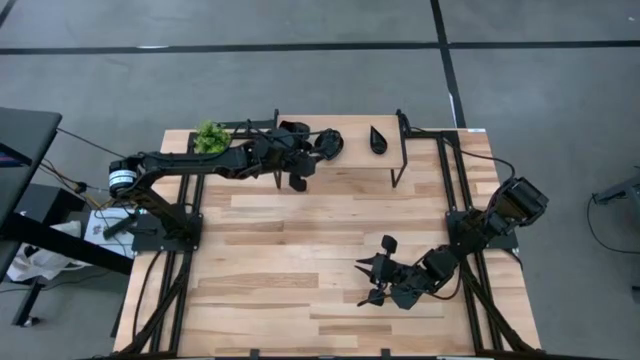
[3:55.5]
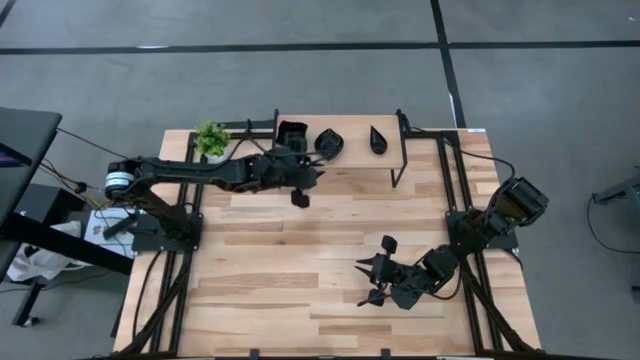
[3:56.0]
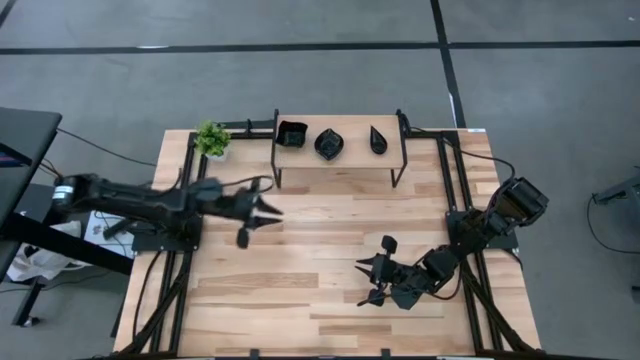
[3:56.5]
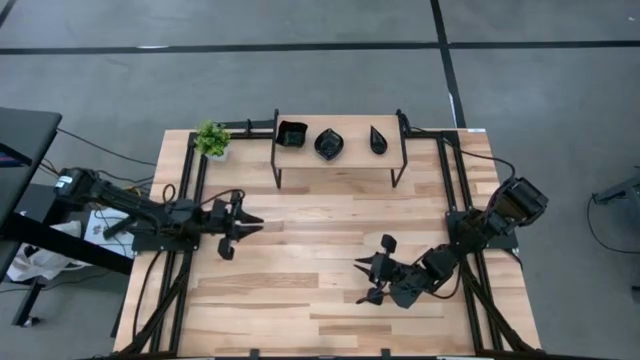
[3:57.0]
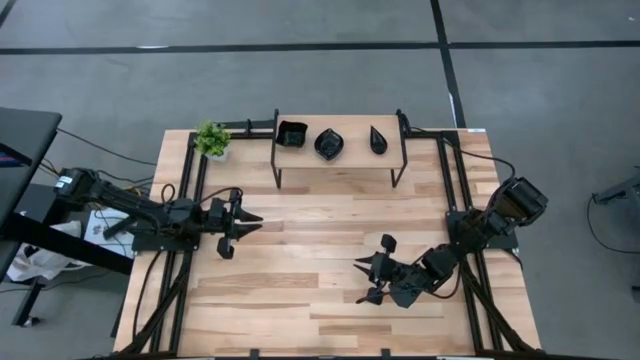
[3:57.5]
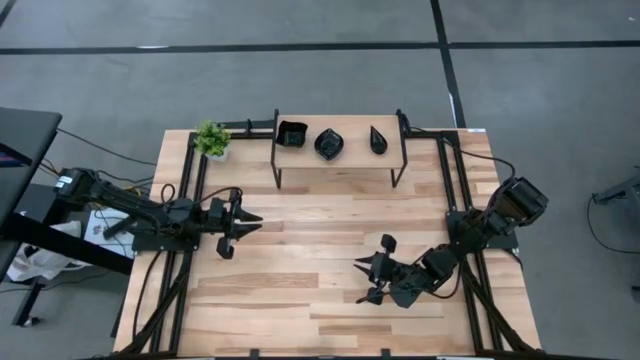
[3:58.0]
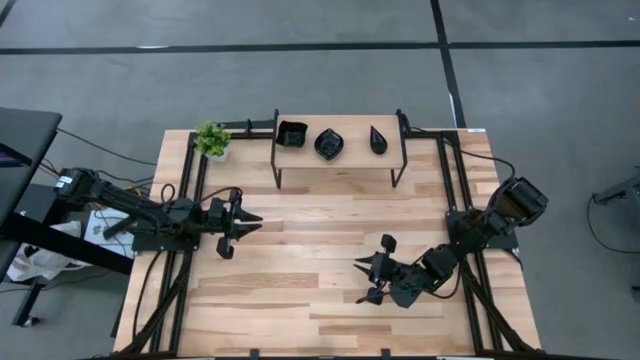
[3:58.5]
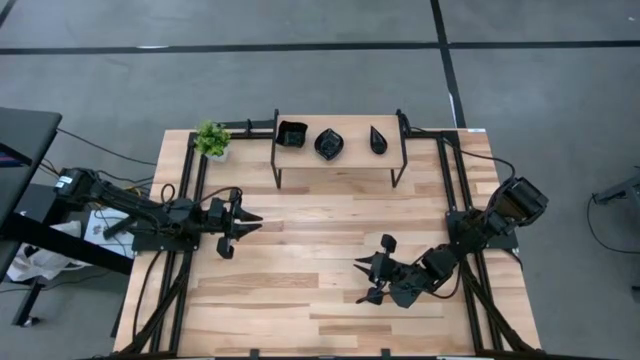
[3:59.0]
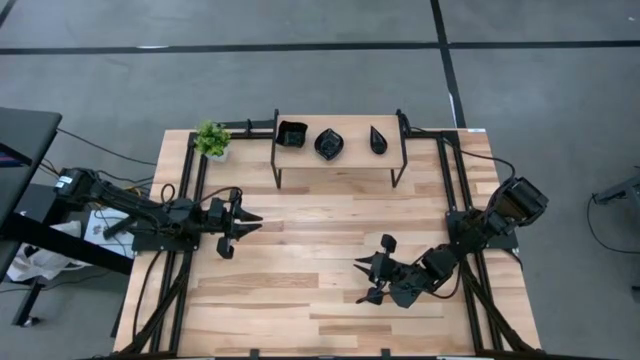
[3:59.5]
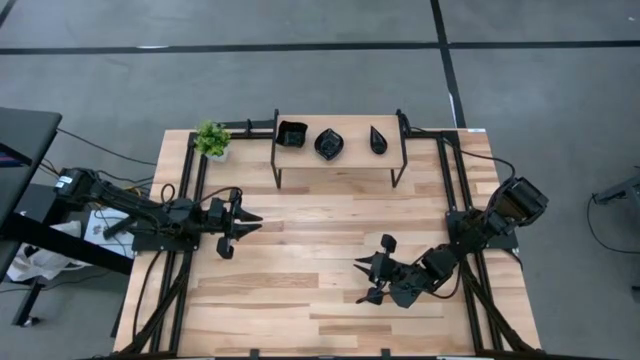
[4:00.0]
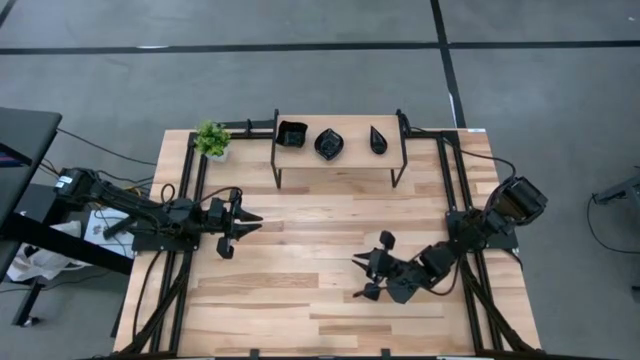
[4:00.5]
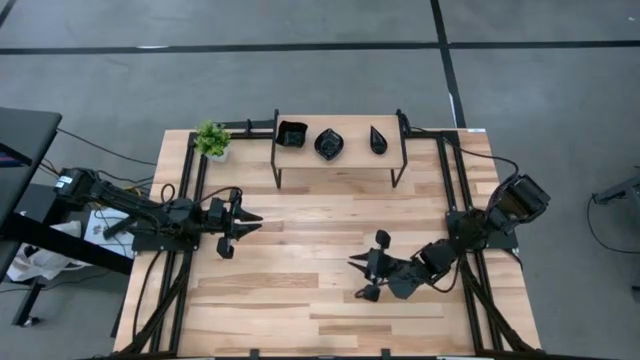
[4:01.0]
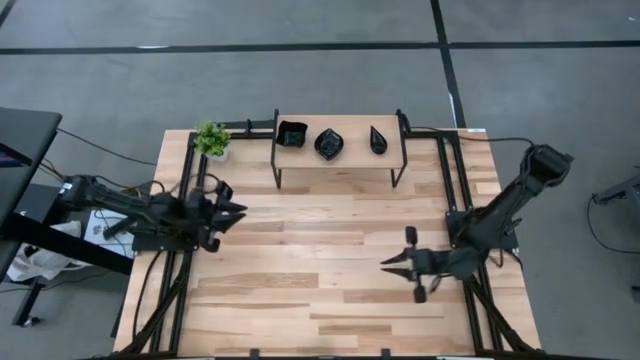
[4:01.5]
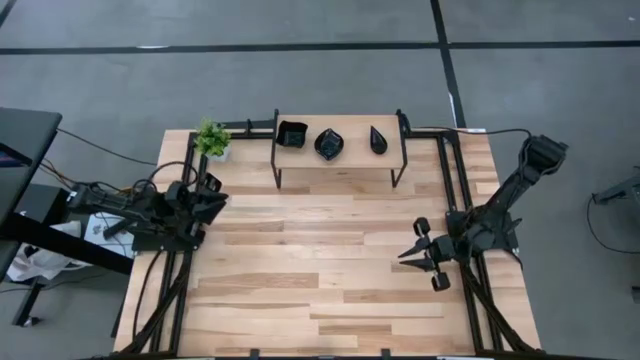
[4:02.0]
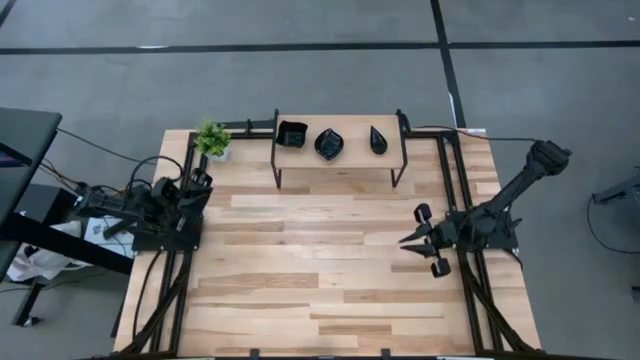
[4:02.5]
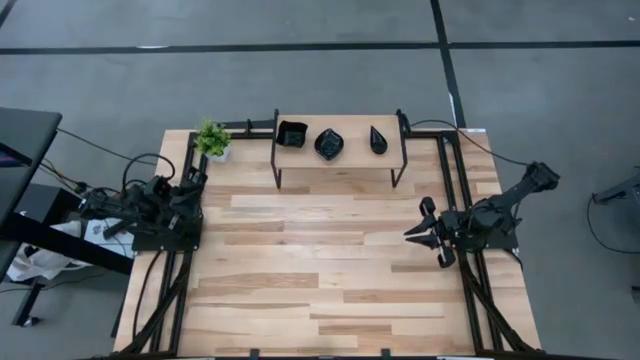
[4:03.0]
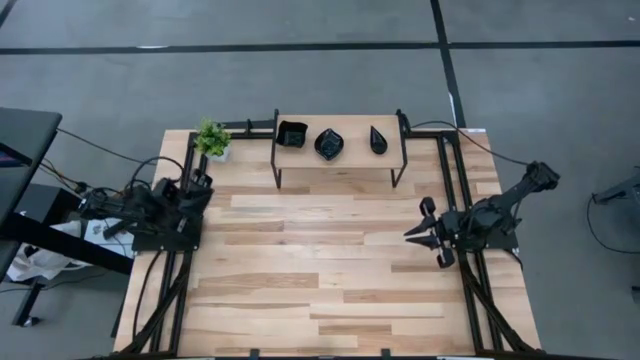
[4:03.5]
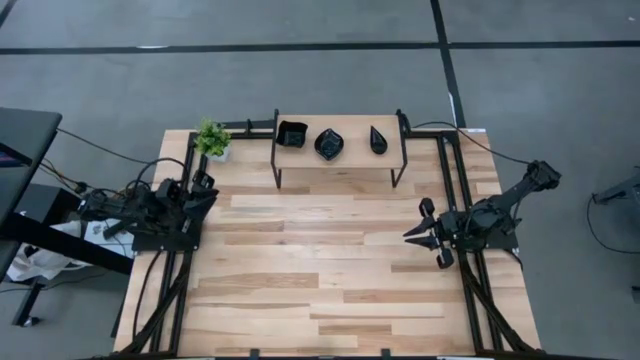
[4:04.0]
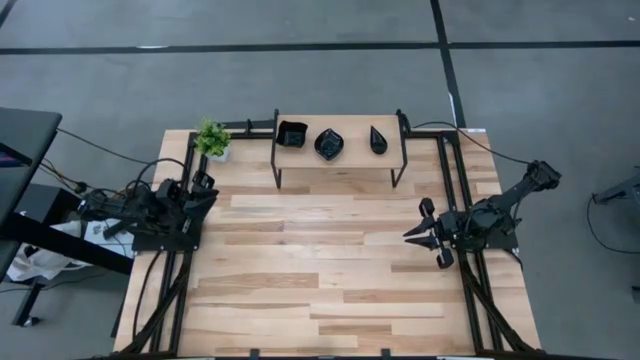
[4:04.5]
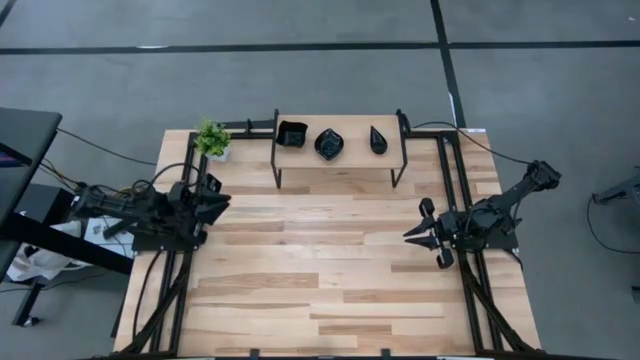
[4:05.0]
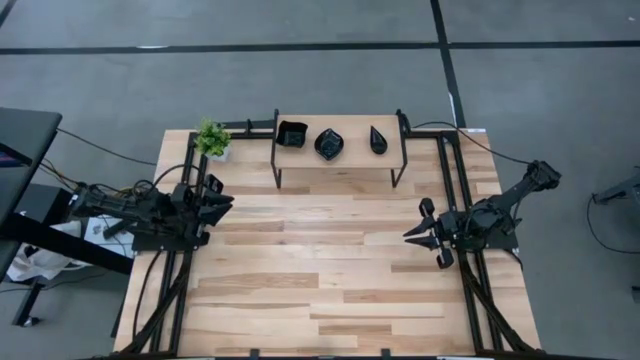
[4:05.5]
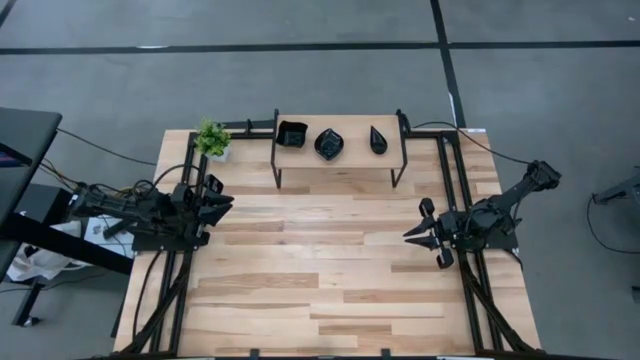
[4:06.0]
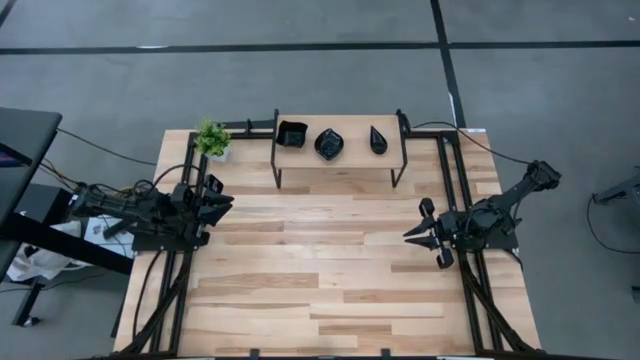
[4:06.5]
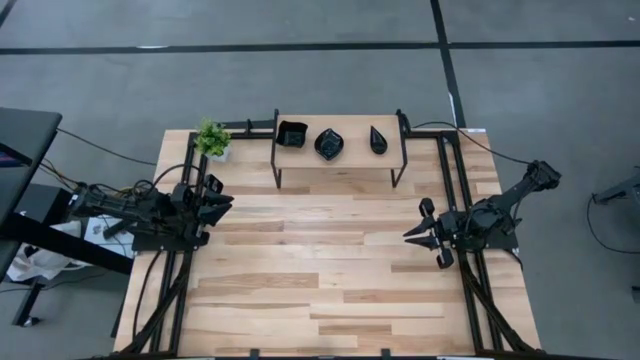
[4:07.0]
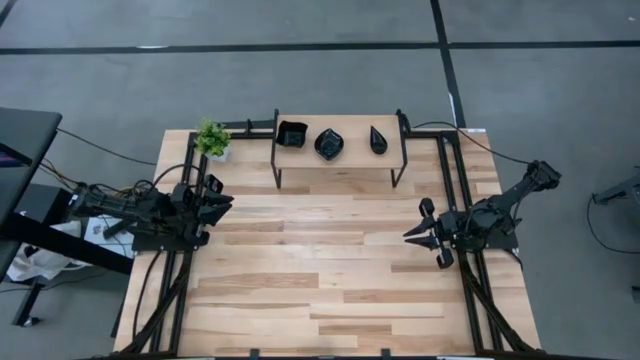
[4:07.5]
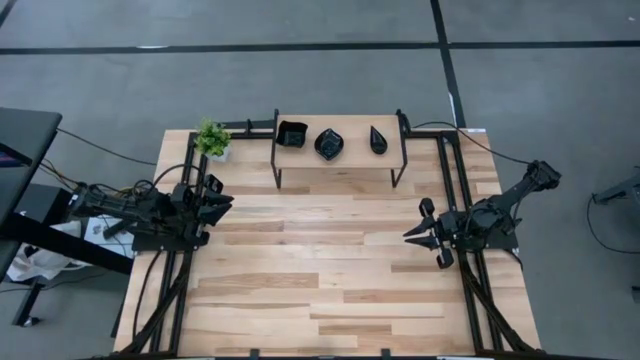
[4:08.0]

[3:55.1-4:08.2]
Task: Pick & Place Mini shaped plates
Return to Home Position

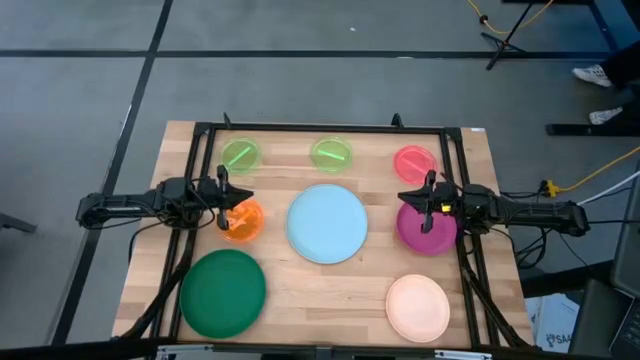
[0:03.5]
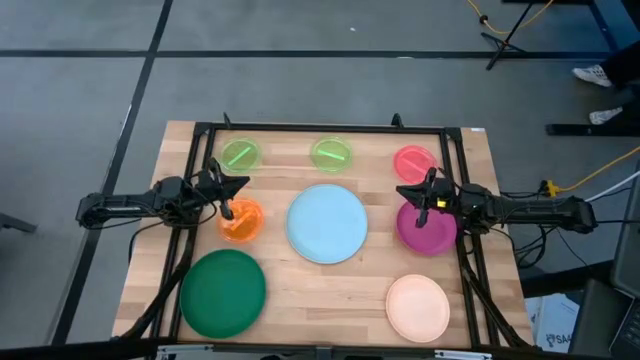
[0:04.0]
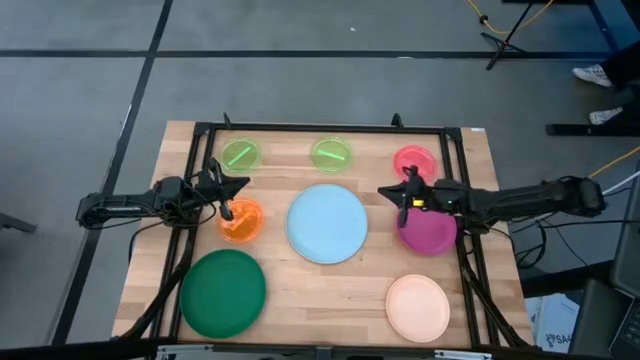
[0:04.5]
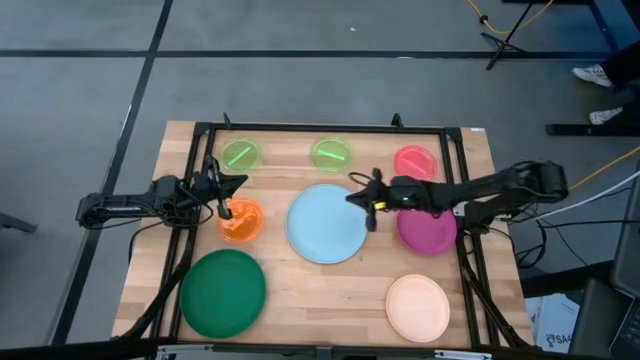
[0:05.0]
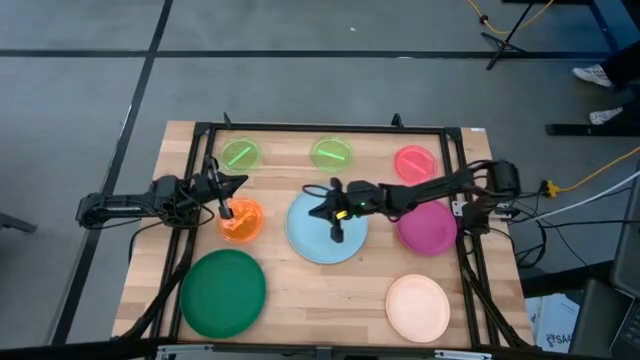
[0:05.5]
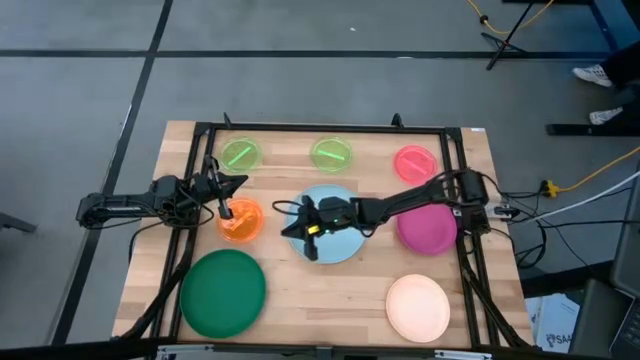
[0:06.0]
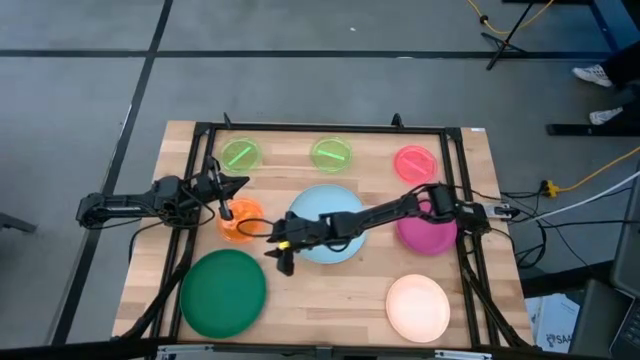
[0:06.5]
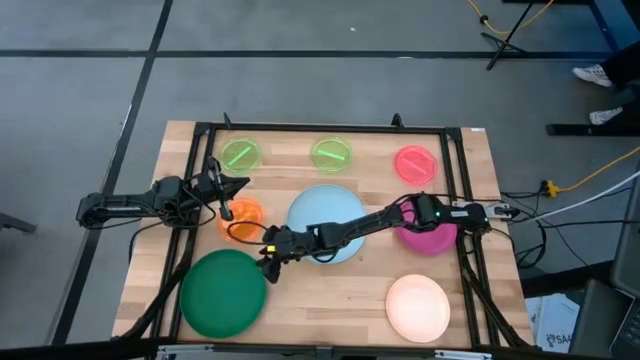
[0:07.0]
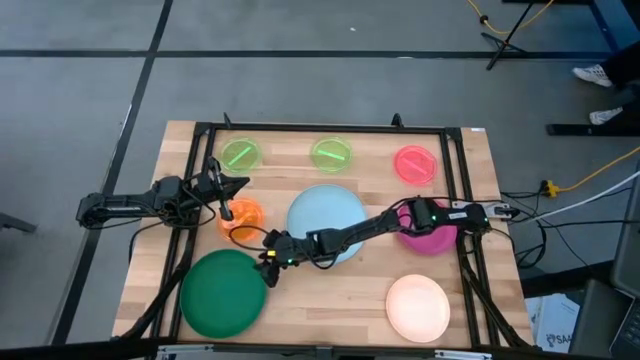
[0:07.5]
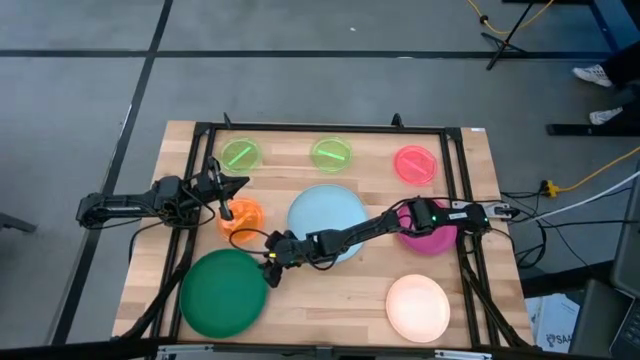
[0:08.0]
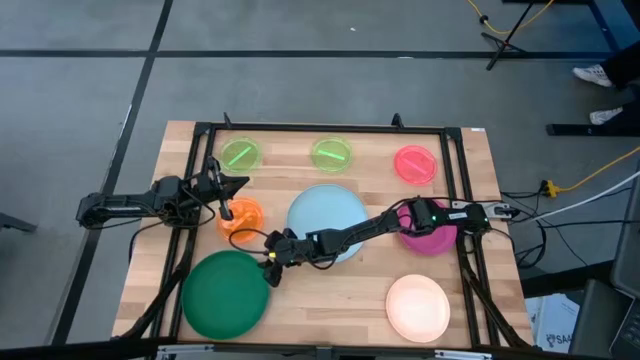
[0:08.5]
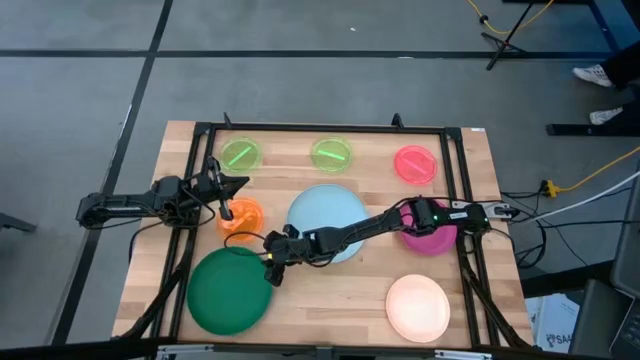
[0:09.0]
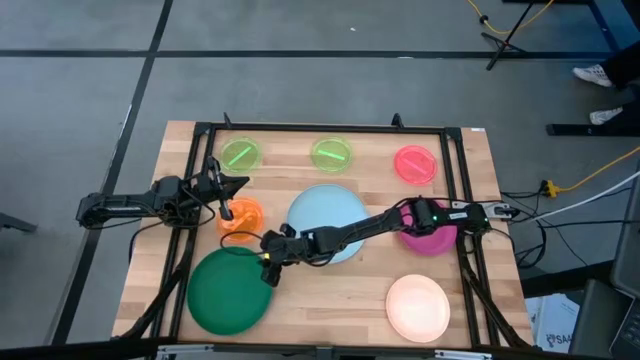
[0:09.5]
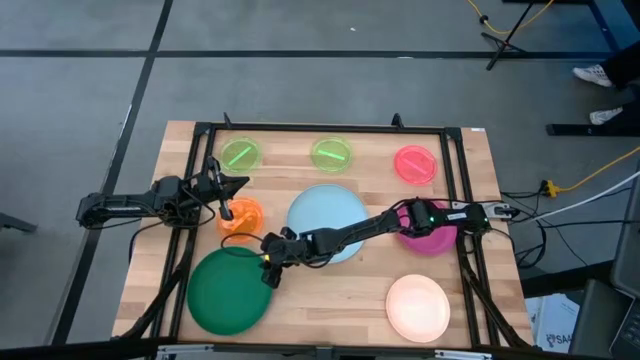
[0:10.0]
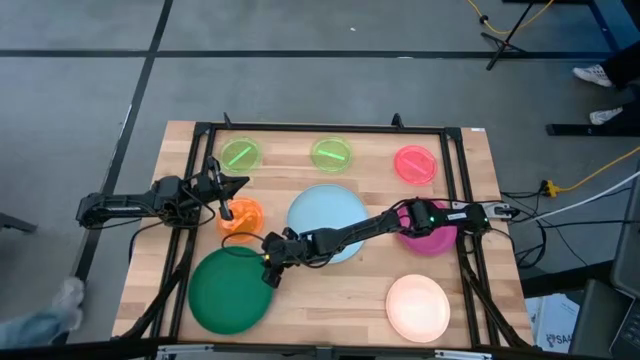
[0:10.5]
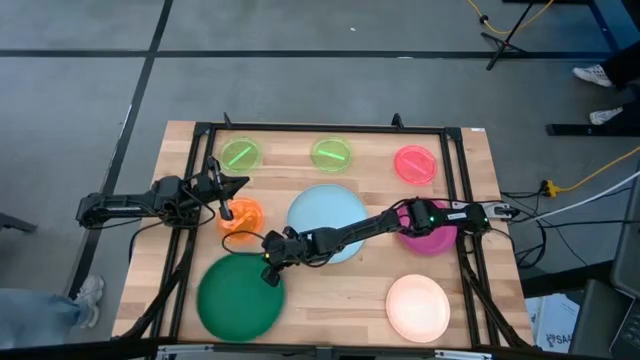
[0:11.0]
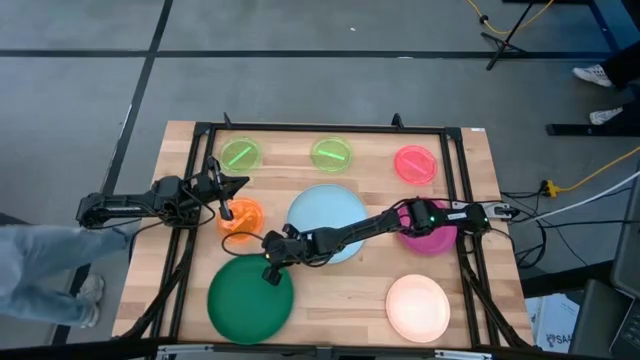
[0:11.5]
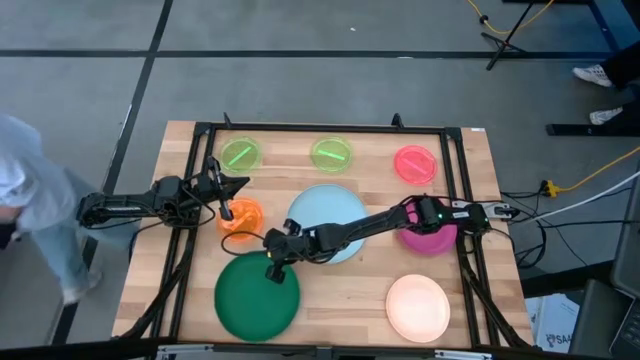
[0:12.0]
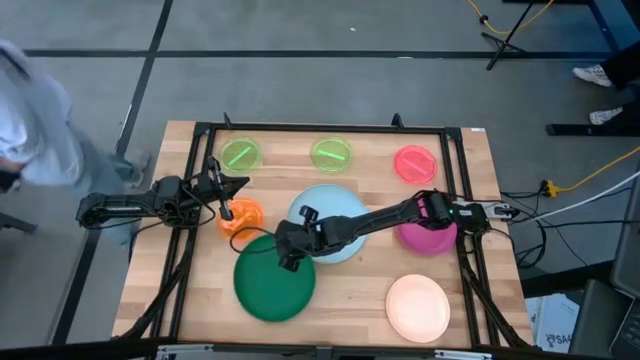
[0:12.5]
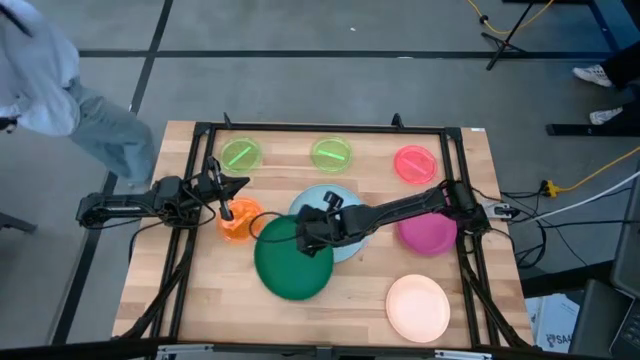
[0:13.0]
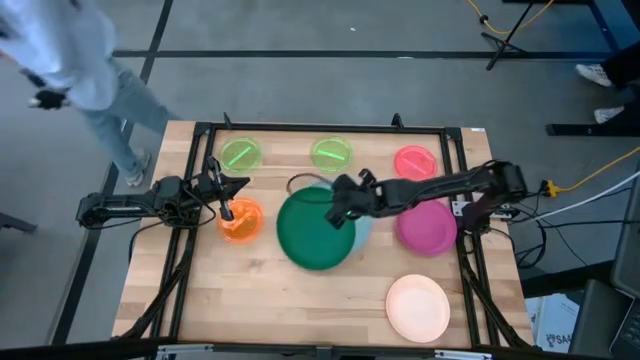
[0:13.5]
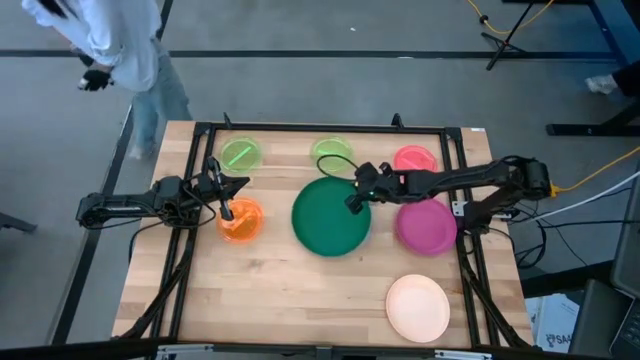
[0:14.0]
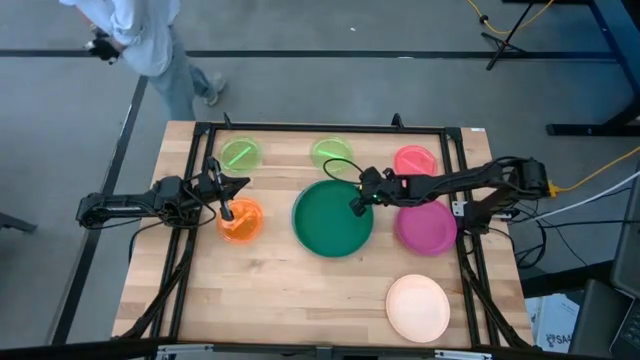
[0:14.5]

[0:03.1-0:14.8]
Task: Stack plastic plates
Stack the dark green plate on the blue plate
